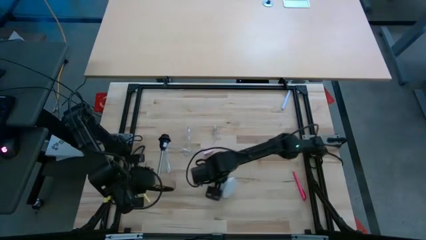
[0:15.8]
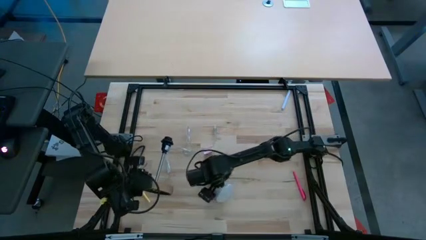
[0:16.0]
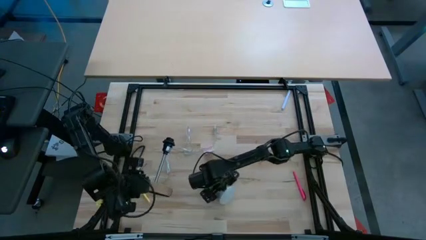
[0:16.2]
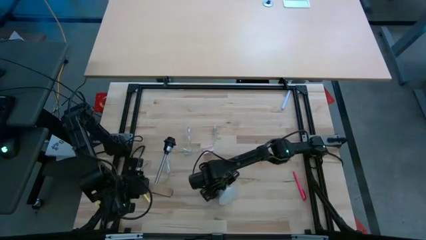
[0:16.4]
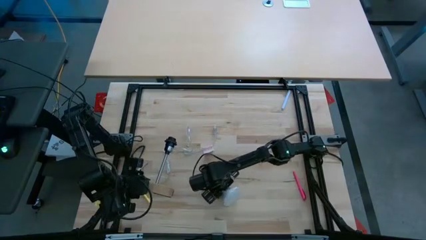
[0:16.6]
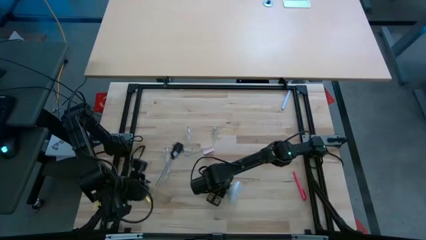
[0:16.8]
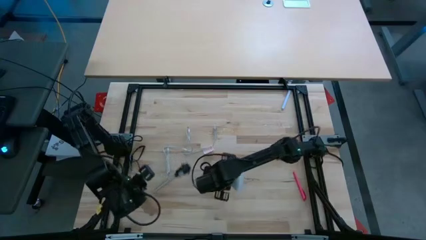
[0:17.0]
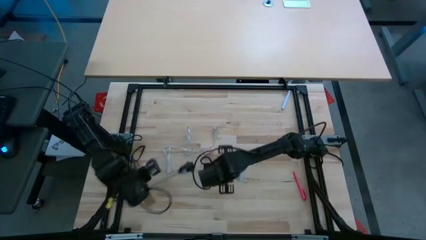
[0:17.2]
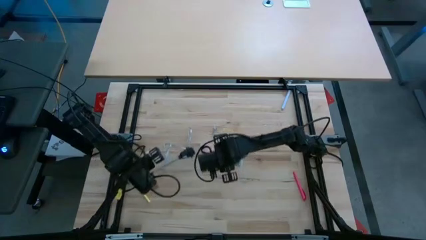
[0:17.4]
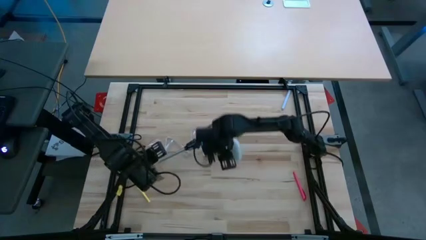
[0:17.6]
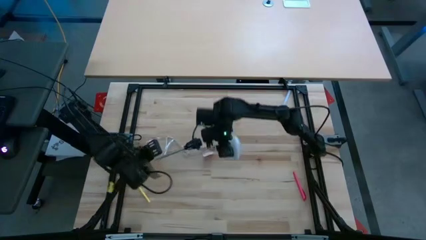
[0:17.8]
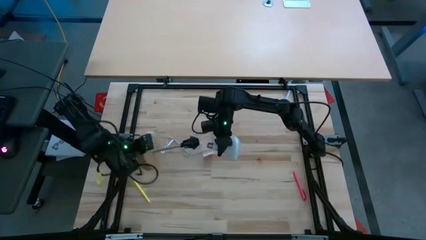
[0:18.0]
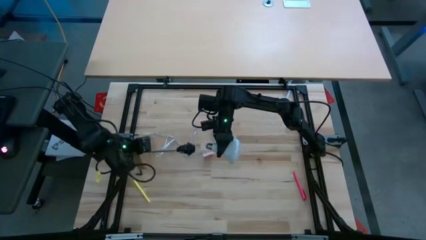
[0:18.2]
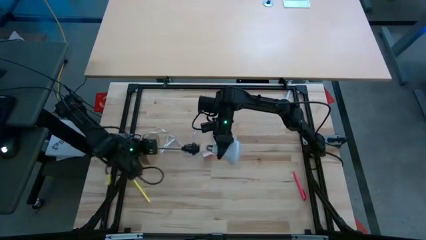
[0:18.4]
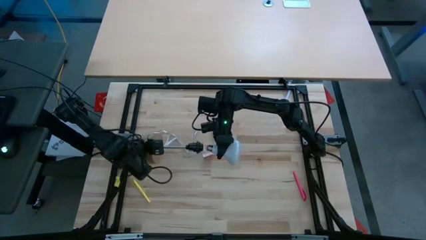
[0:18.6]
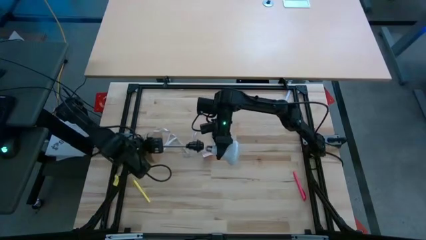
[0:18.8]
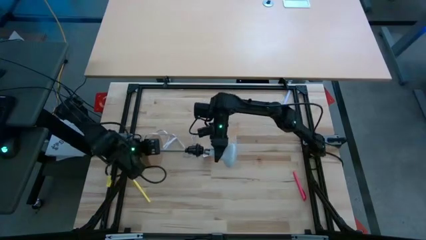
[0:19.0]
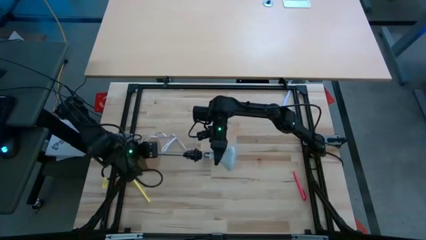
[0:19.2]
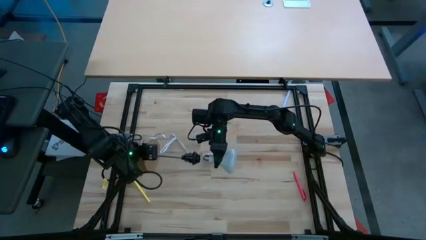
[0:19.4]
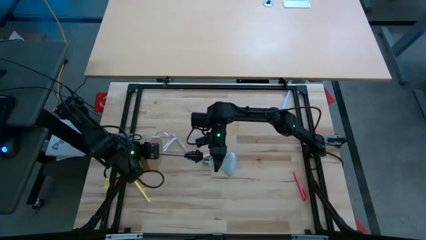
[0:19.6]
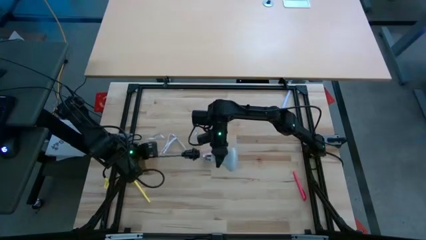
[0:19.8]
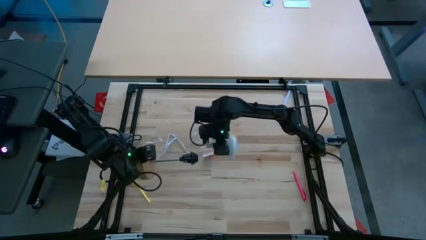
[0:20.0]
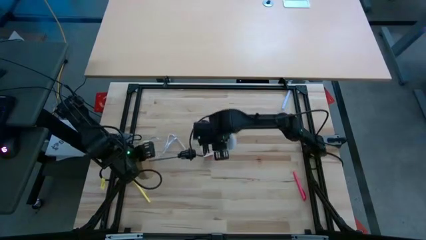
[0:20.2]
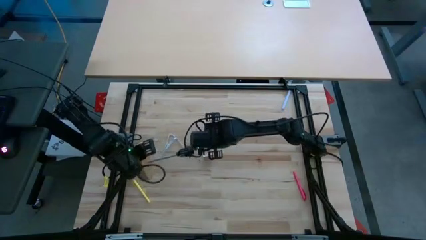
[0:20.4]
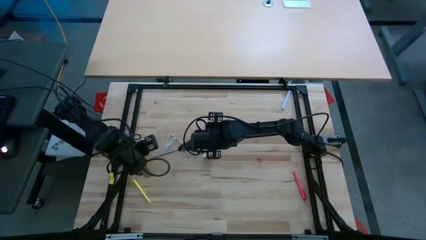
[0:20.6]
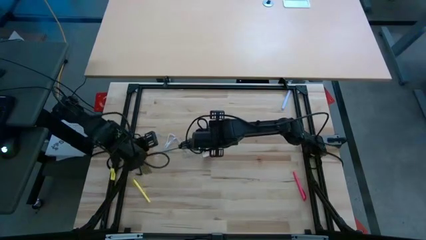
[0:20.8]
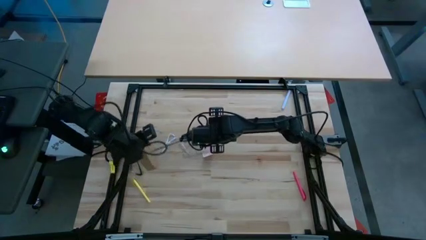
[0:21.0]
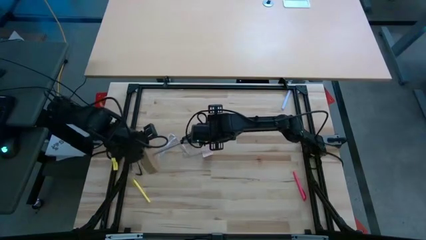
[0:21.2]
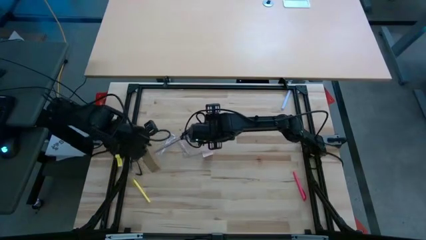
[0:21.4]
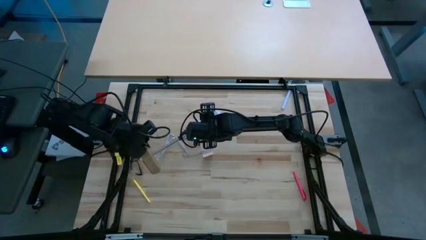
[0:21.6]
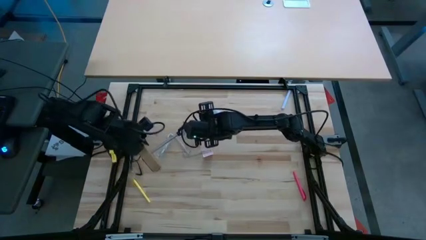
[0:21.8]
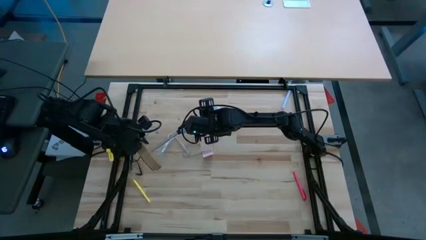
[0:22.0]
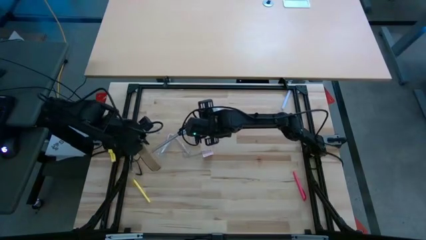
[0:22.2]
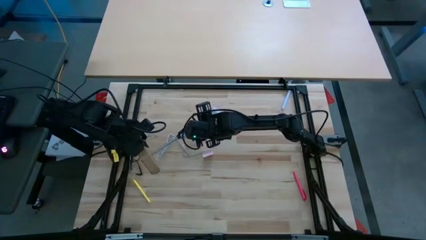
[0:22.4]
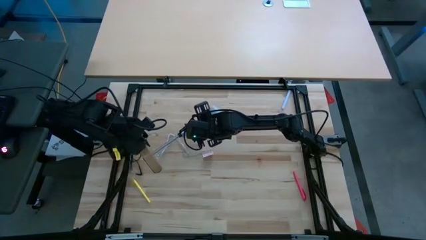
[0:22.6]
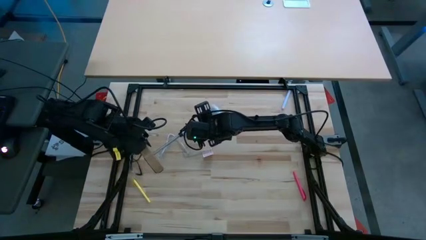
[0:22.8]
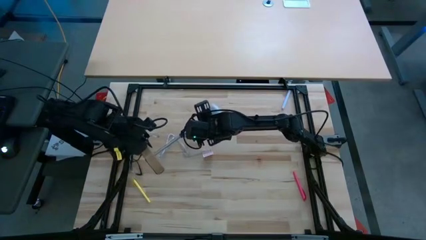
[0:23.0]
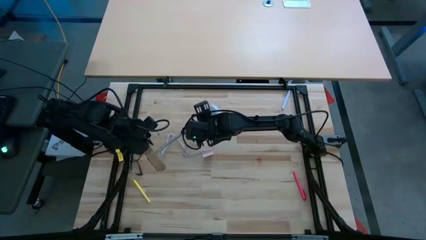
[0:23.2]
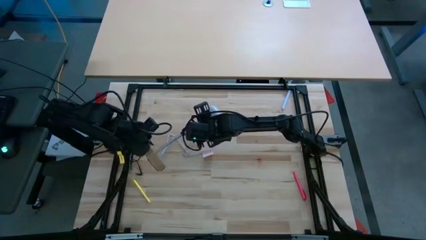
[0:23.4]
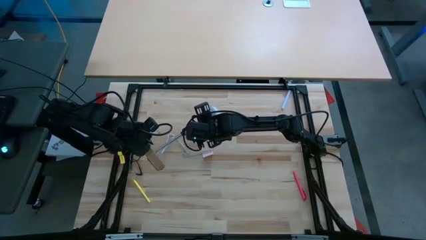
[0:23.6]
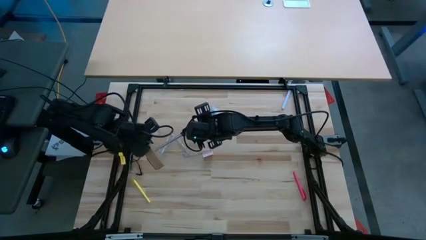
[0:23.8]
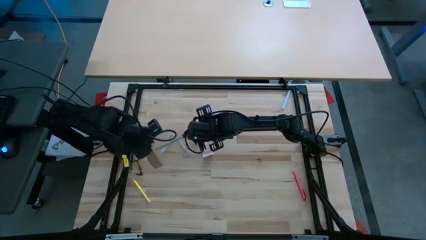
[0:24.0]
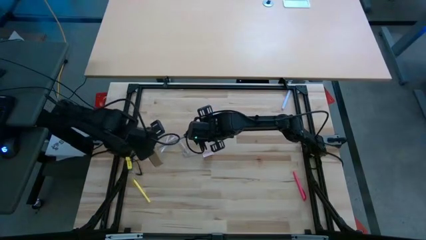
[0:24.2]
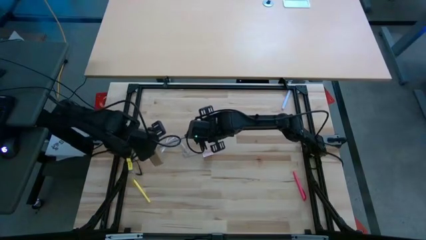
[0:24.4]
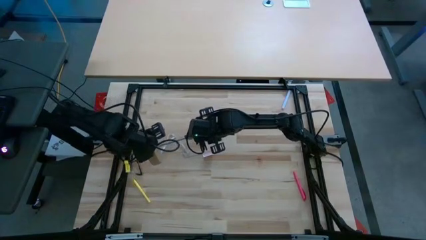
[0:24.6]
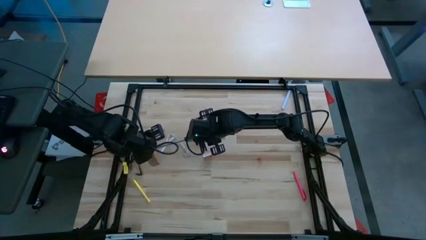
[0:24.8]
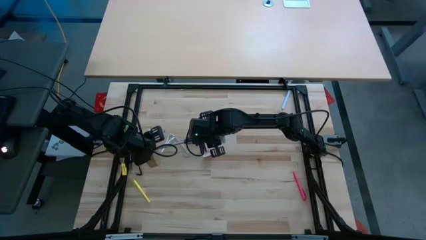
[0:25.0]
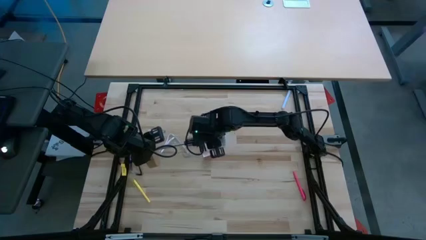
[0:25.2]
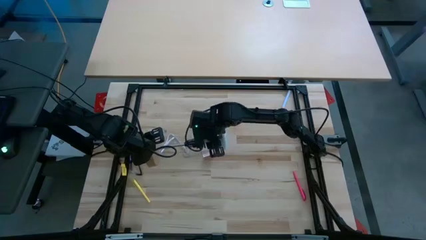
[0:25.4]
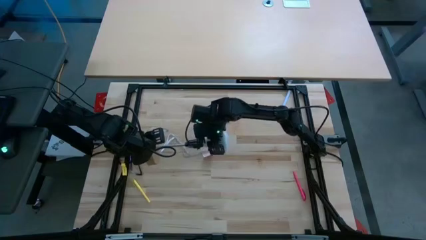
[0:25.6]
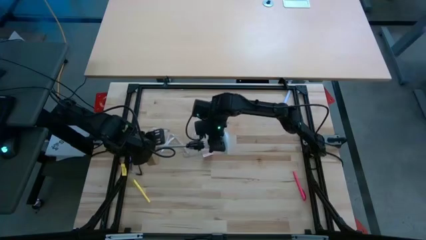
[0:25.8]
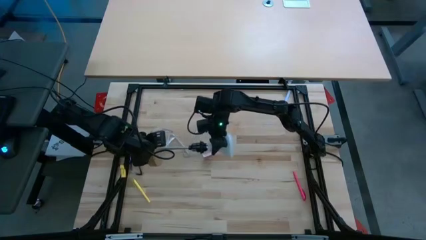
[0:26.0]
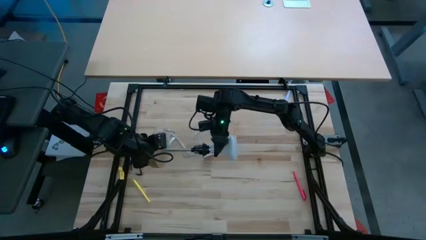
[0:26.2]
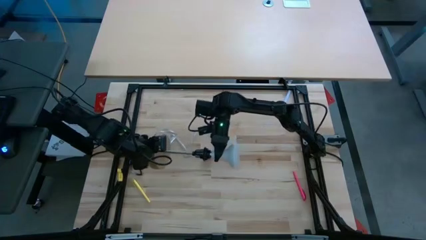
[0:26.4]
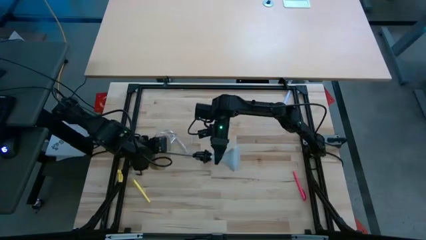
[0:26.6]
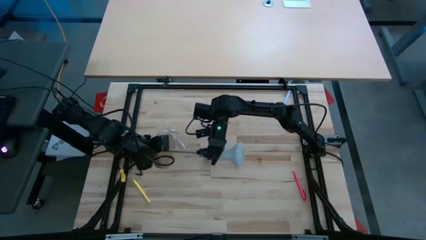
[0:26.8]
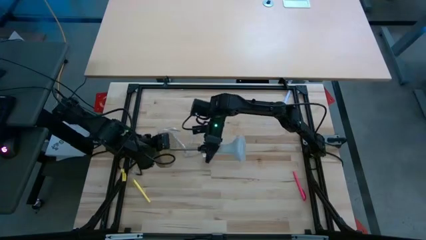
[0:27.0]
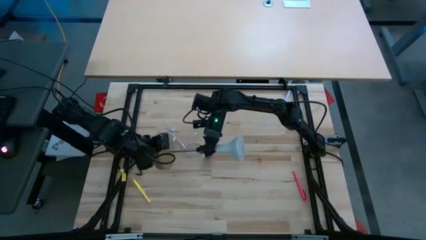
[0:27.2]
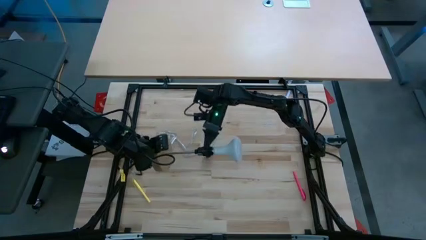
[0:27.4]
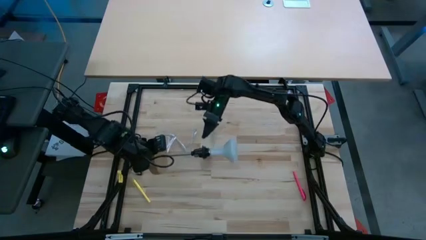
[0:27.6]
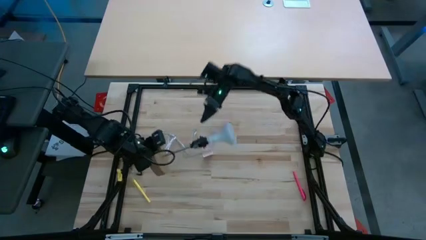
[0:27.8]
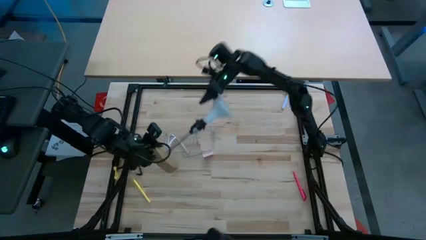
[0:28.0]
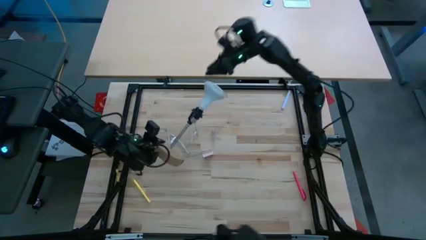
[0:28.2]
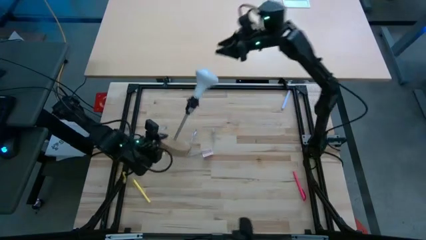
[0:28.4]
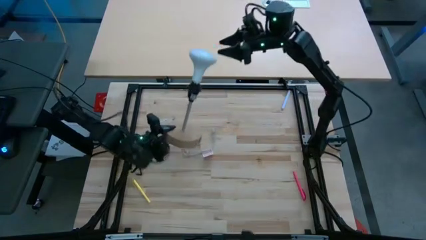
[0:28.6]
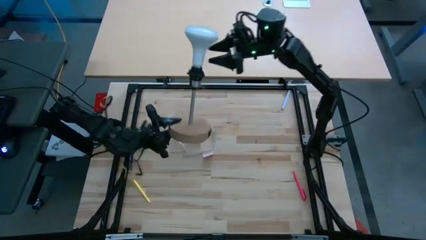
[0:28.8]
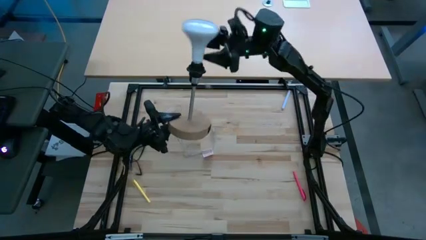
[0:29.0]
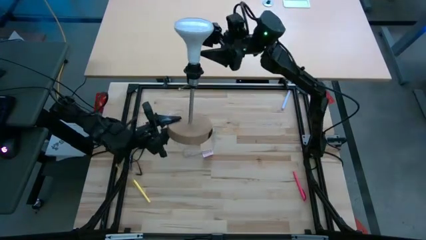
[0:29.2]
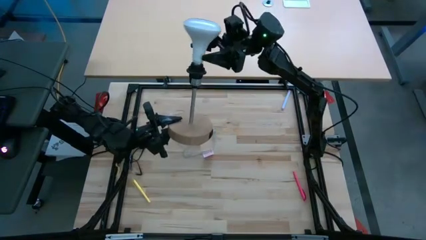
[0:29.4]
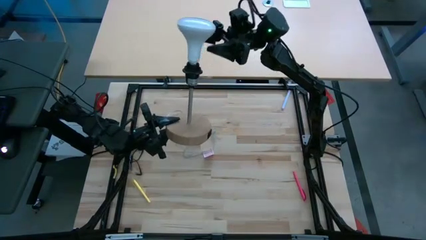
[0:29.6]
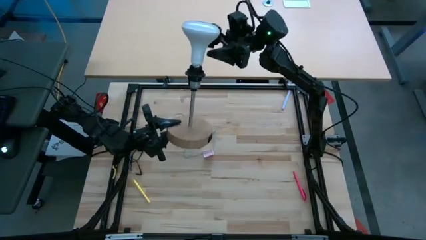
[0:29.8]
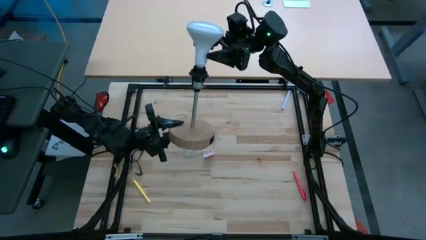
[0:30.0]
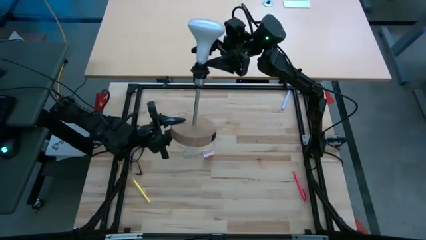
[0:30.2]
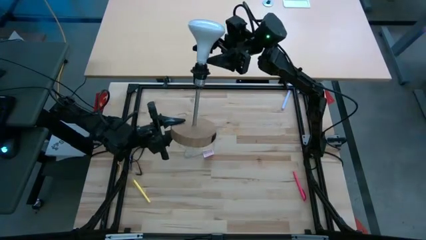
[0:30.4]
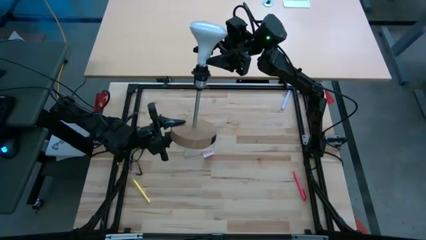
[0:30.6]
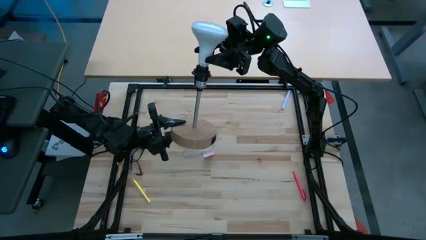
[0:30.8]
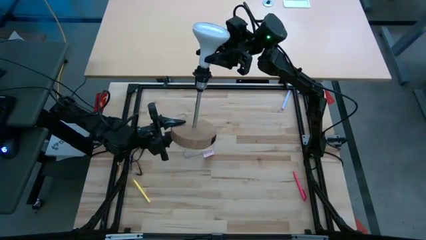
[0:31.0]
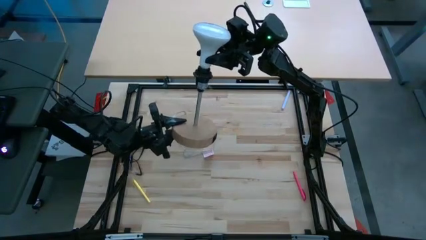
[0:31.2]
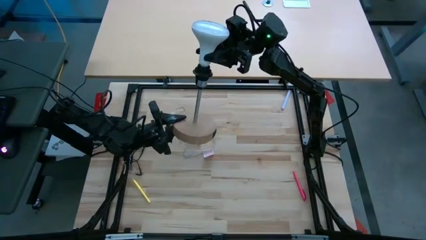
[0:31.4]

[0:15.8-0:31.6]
Task: Screw lightbulb
Insert the light bulb into the lamp holder
